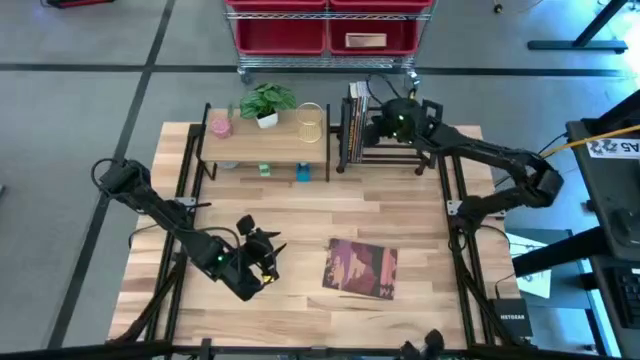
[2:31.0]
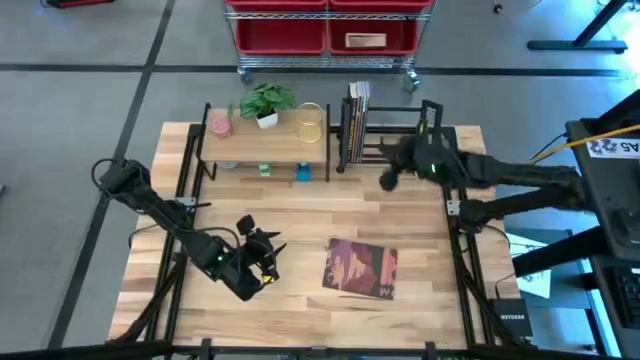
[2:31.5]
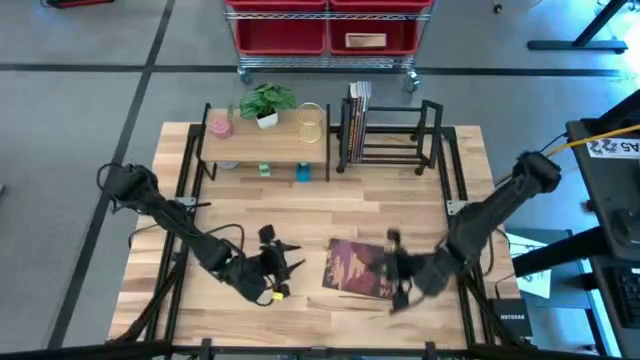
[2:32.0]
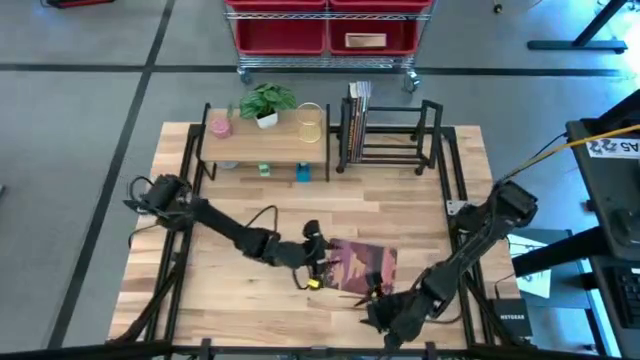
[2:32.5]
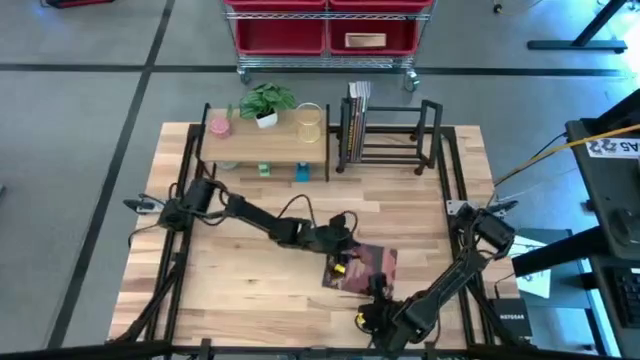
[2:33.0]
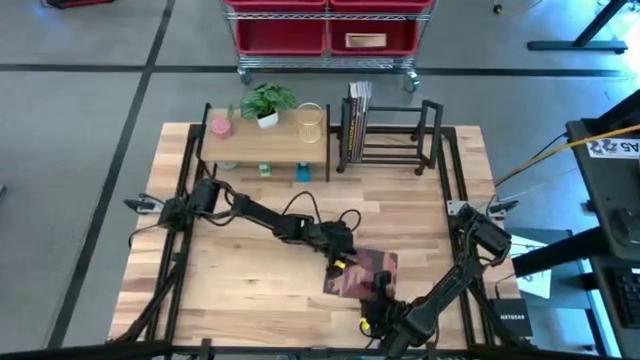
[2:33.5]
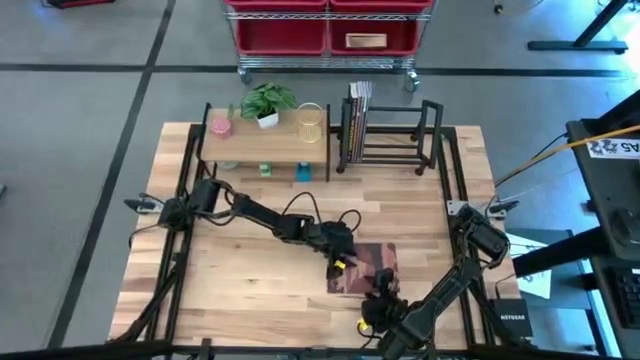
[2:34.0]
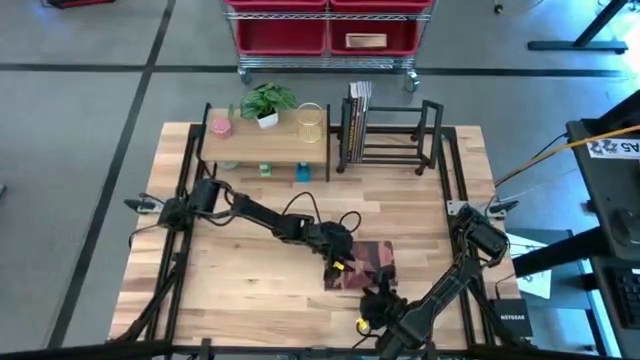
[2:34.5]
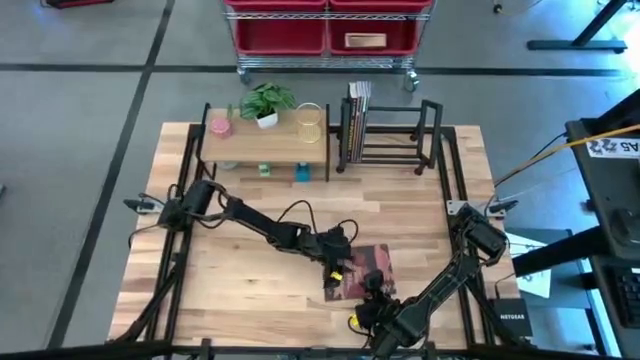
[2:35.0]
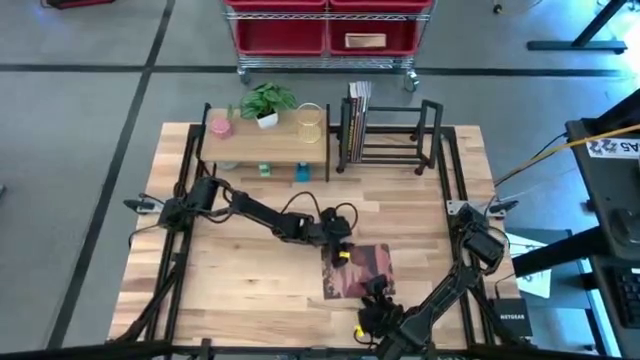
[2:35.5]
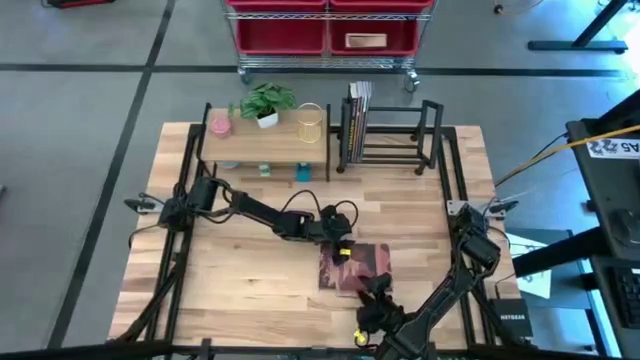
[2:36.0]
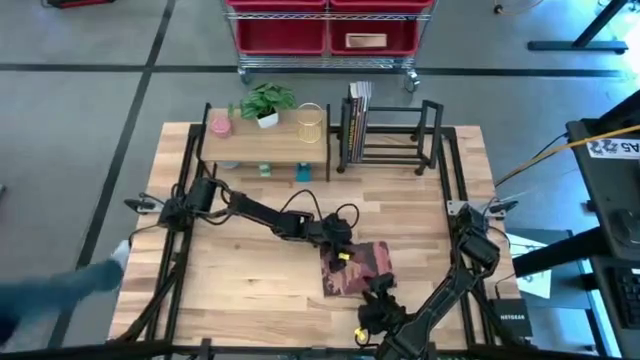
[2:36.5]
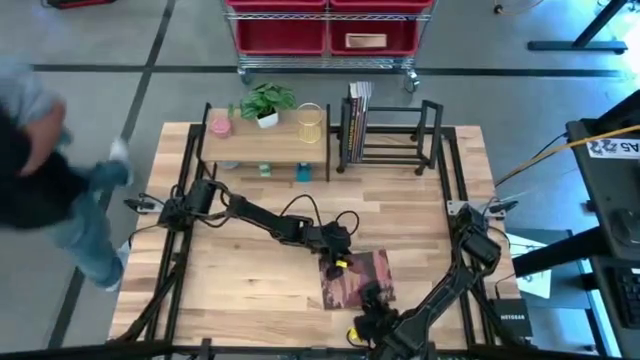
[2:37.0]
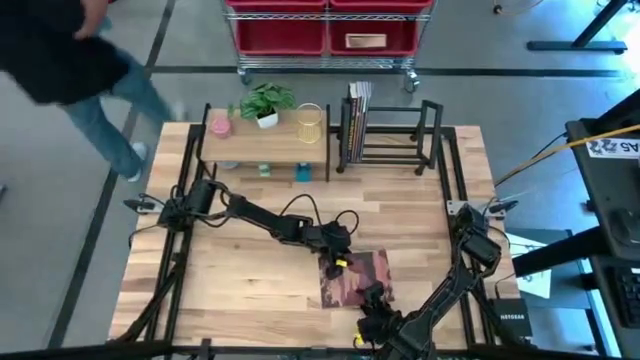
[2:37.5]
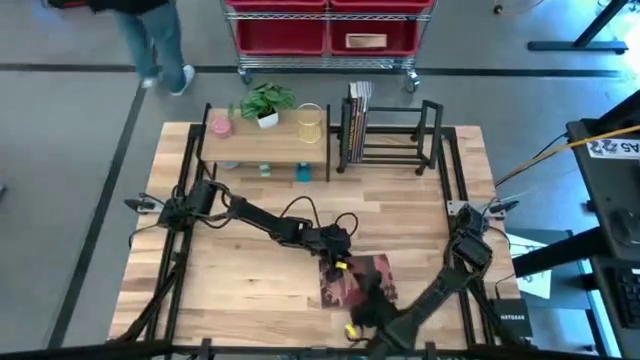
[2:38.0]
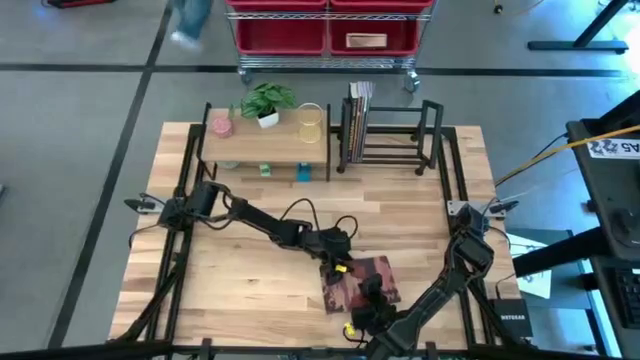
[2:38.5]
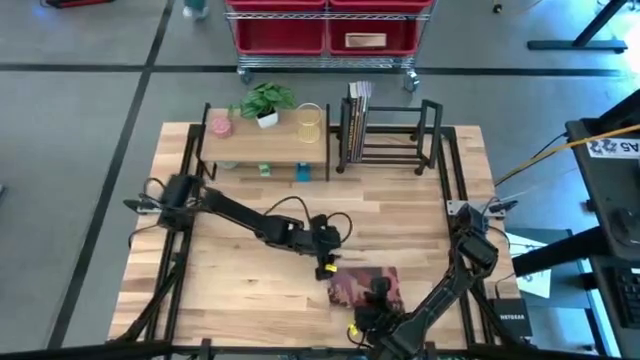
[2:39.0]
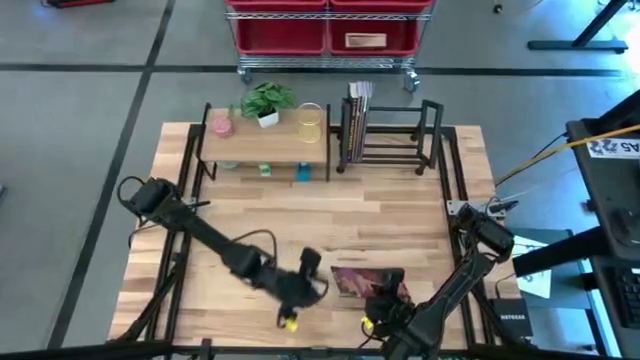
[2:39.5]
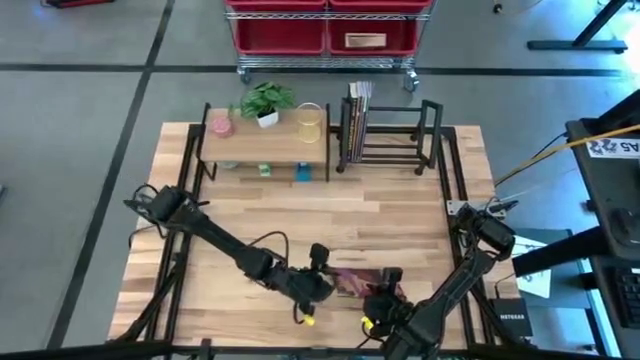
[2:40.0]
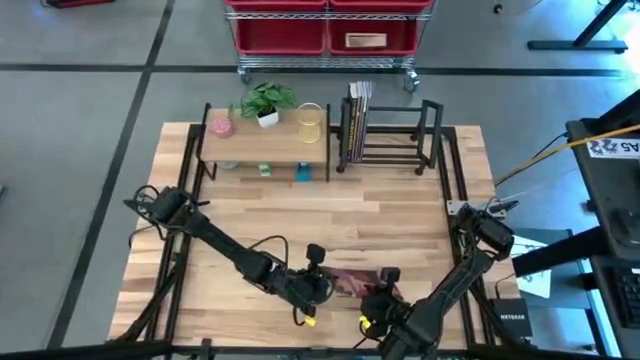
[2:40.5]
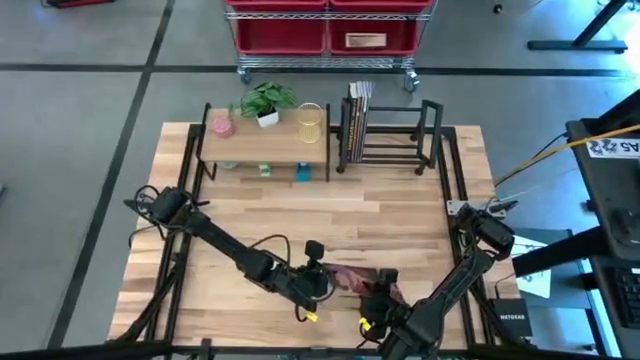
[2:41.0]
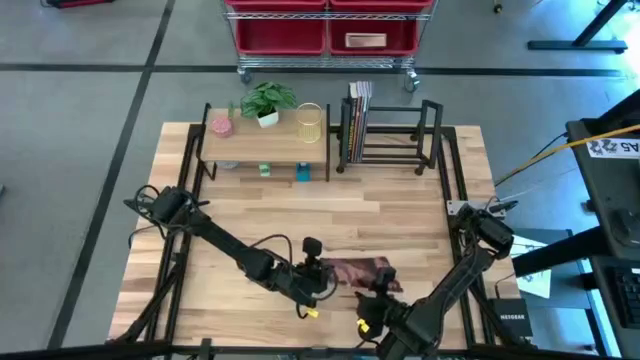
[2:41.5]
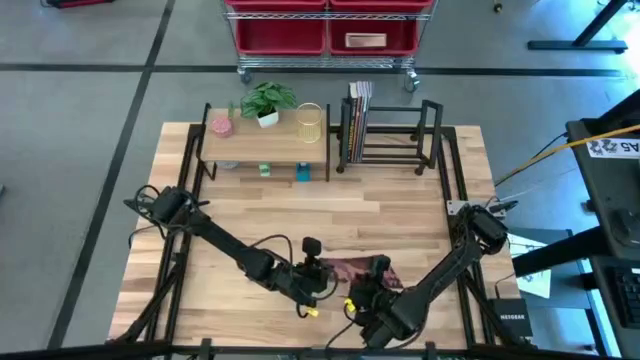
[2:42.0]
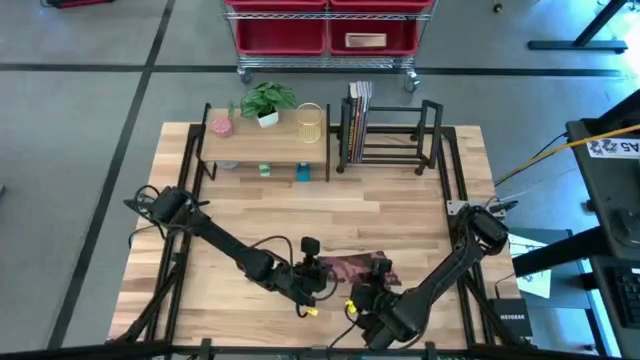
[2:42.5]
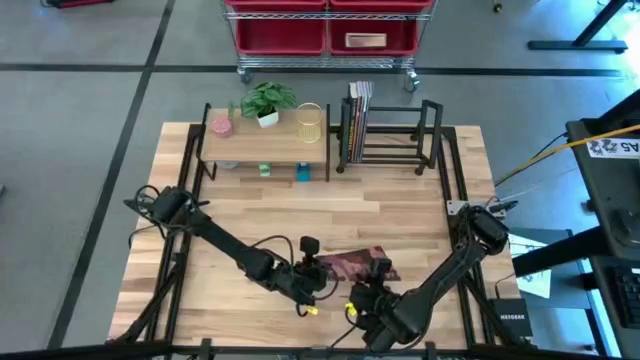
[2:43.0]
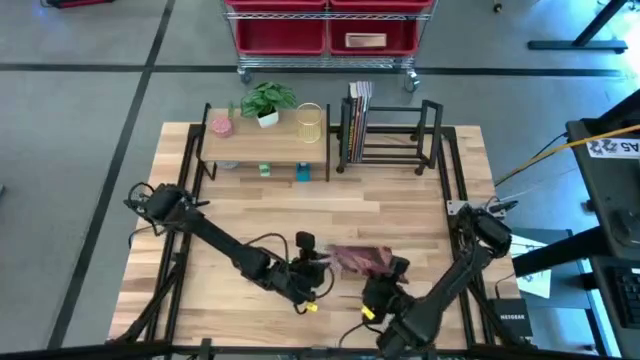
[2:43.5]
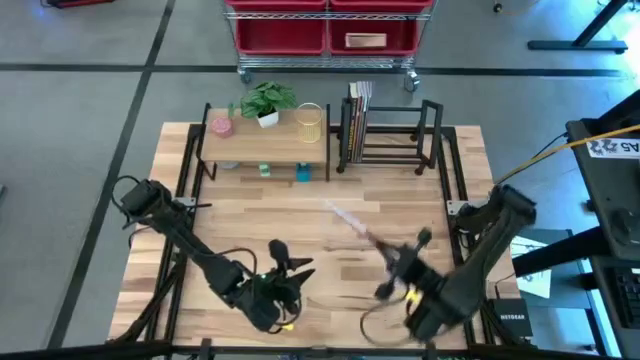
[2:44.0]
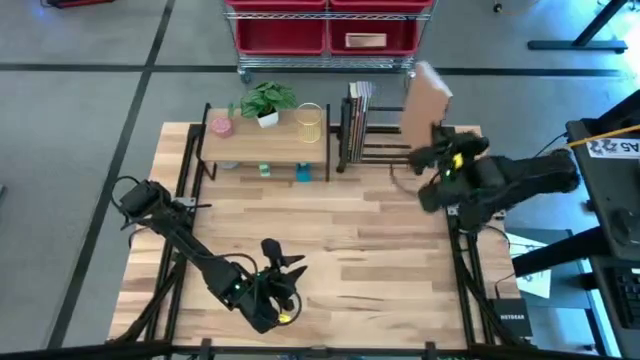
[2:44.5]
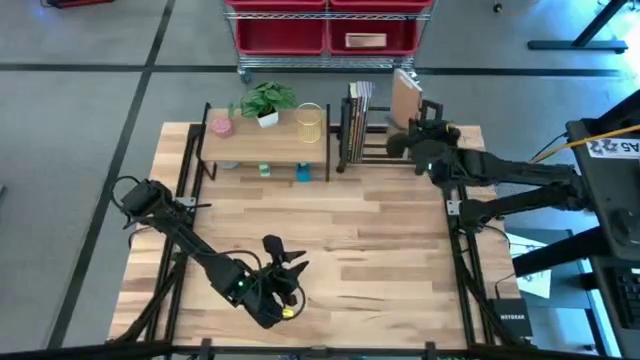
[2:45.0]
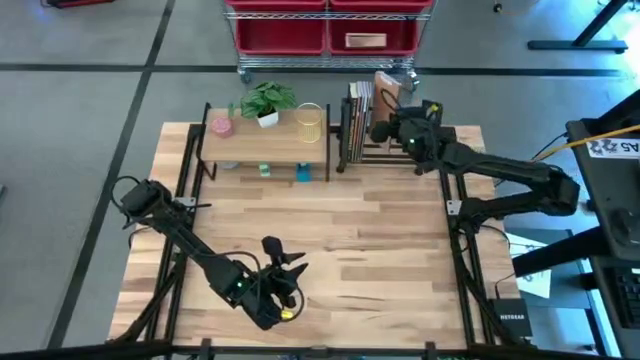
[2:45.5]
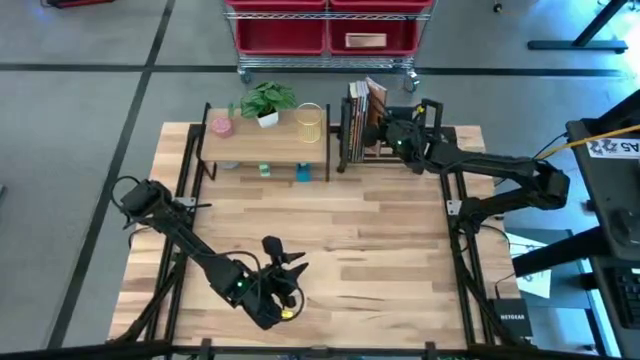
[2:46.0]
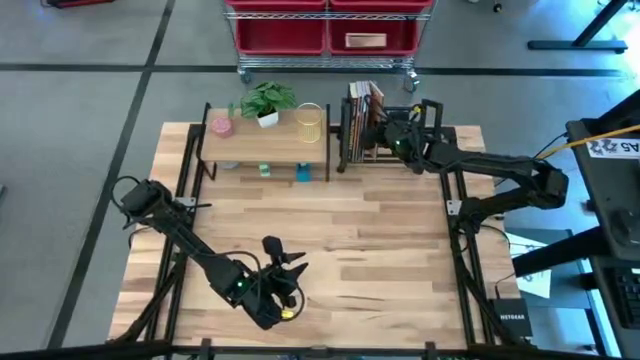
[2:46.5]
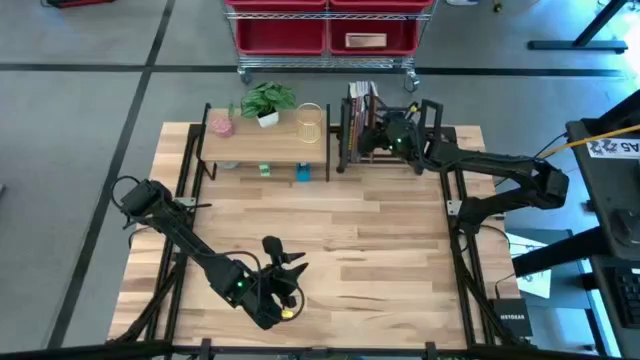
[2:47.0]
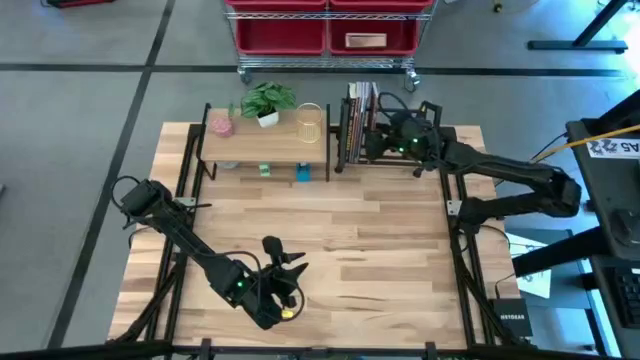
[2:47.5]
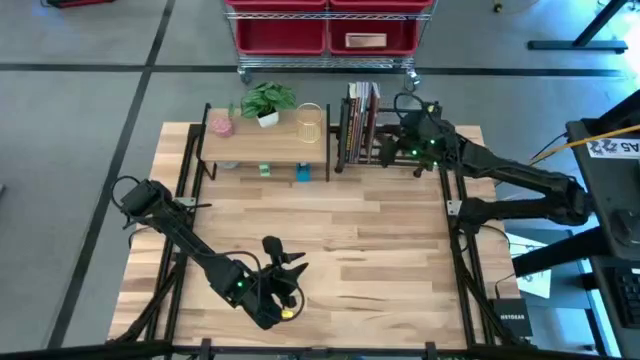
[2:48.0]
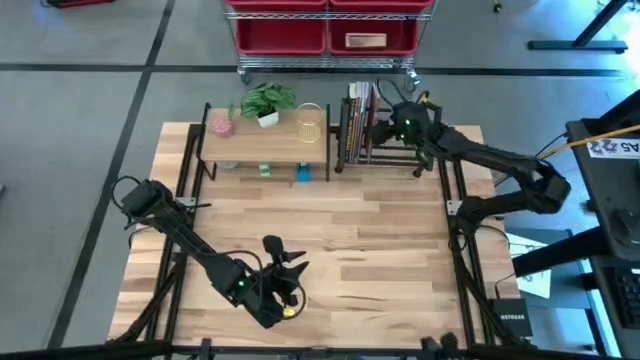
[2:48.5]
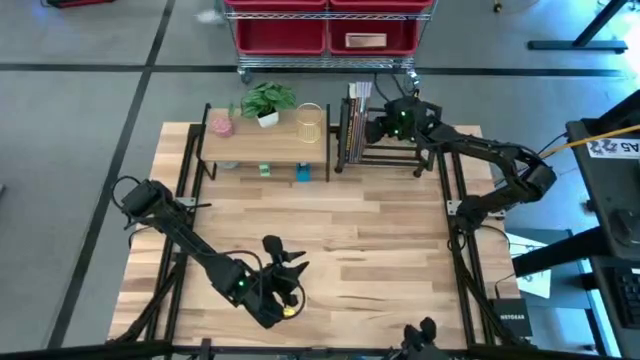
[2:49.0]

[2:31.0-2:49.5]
Task: Stock shelves
Put the red purple book on the bookshelf

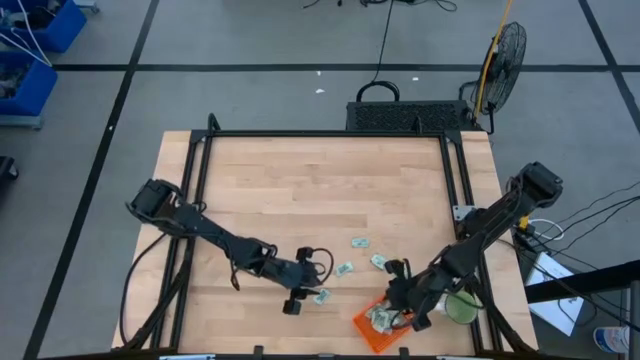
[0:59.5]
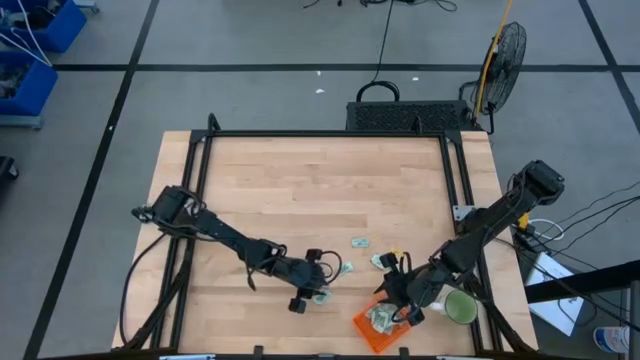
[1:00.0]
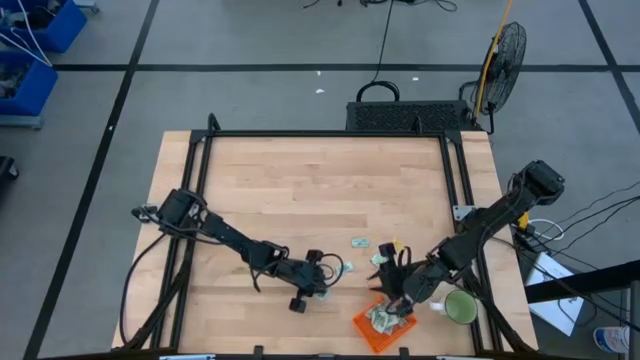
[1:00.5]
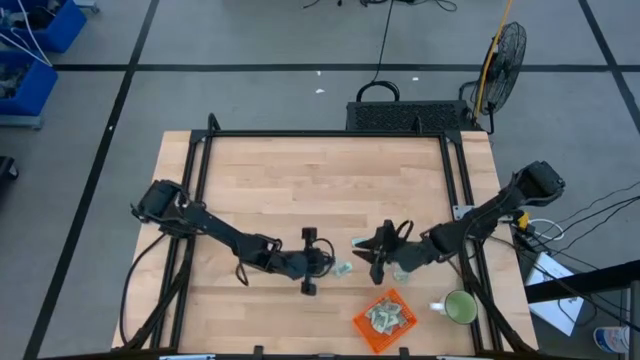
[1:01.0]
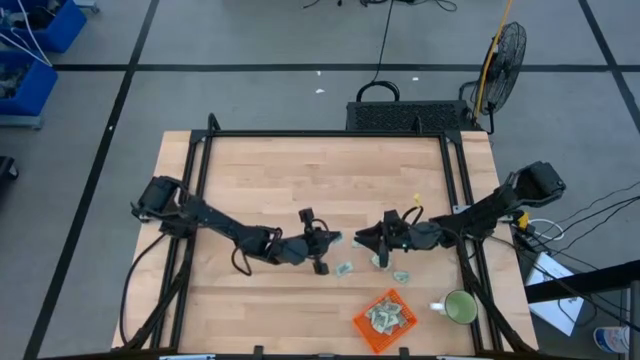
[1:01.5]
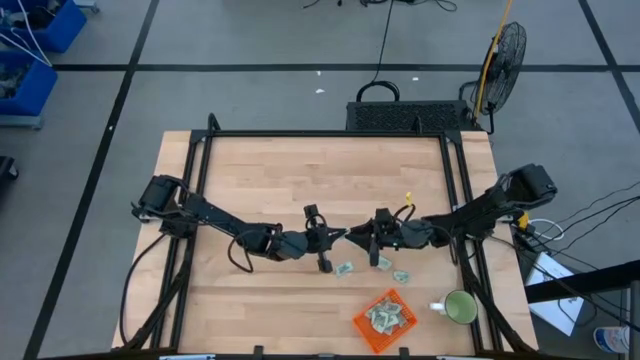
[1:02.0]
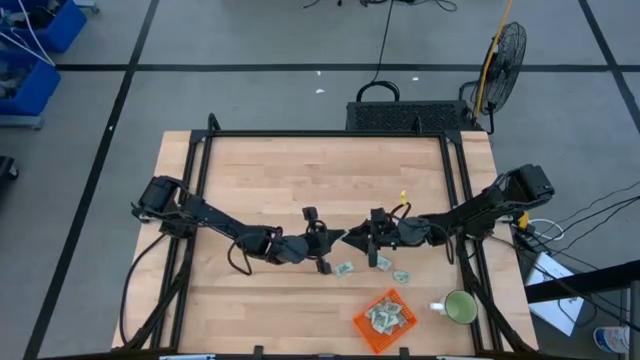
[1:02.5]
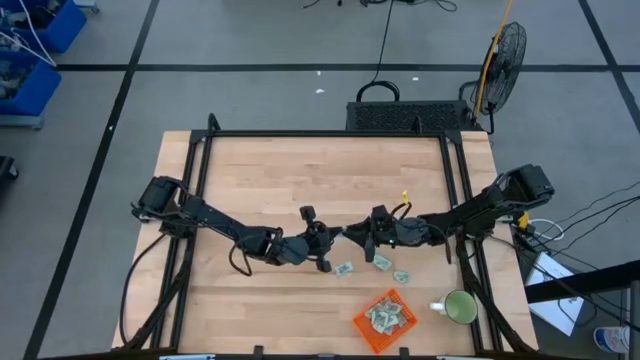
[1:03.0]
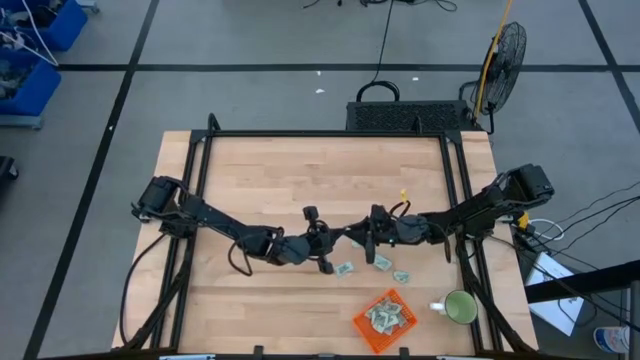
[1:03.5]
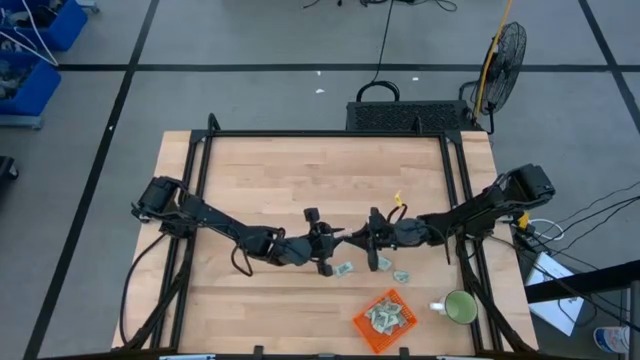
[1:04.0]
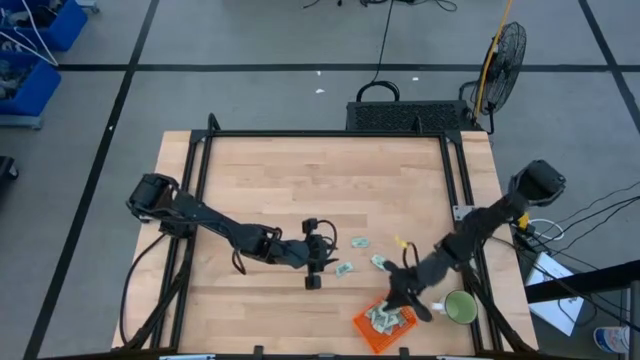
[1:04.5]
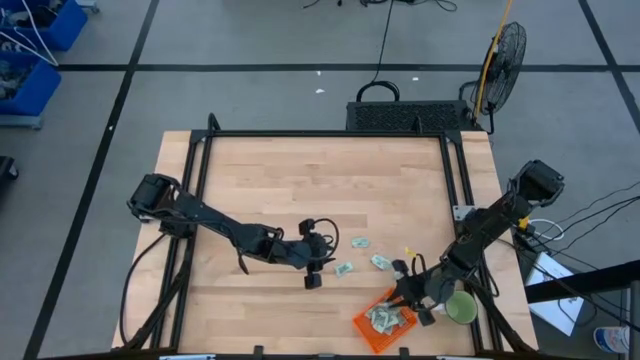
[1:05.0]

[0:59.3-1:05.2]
Task: Pick and place Stevia / Truvia into bins
Put the stevia packet into the orange bin
